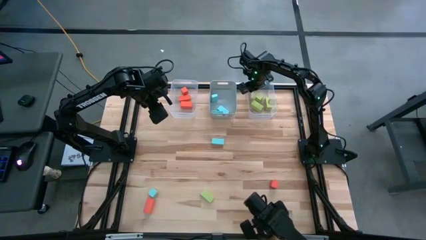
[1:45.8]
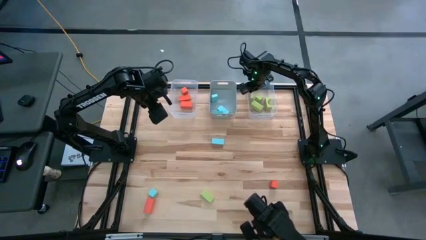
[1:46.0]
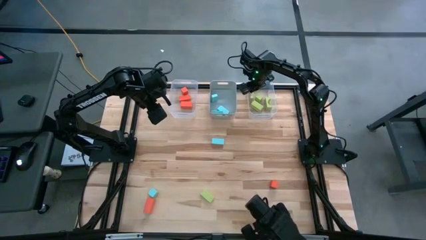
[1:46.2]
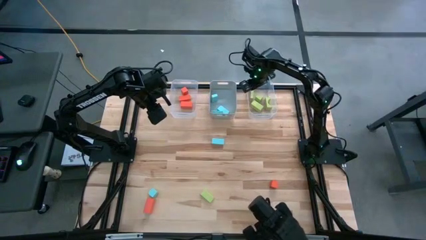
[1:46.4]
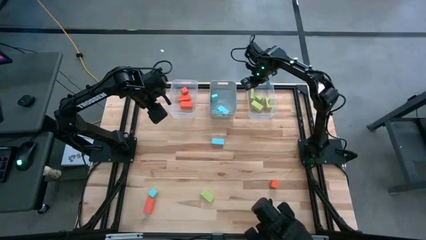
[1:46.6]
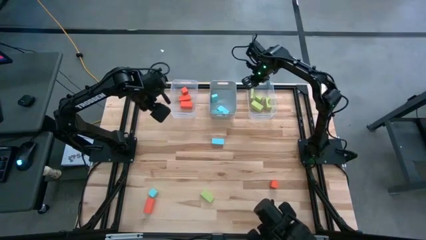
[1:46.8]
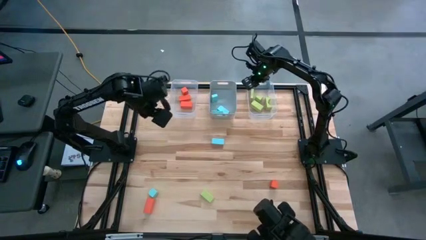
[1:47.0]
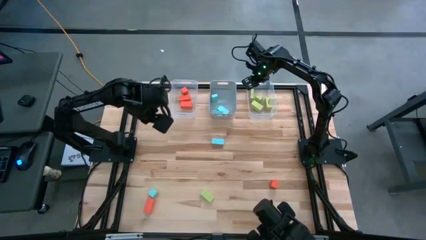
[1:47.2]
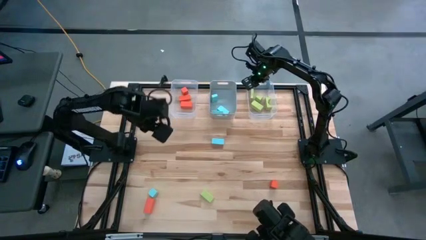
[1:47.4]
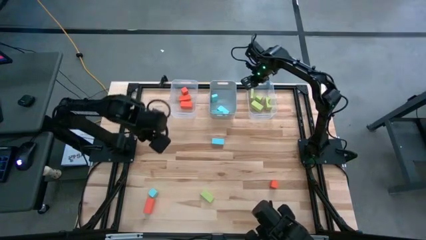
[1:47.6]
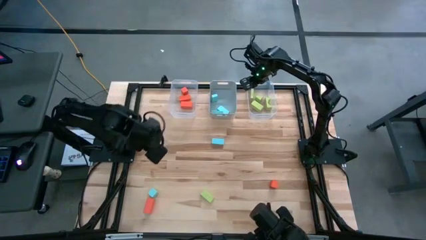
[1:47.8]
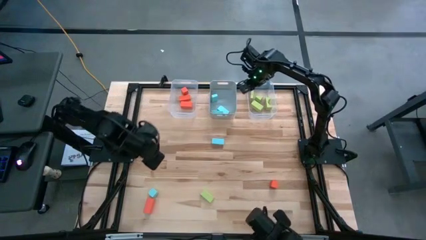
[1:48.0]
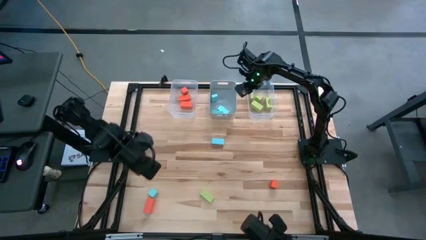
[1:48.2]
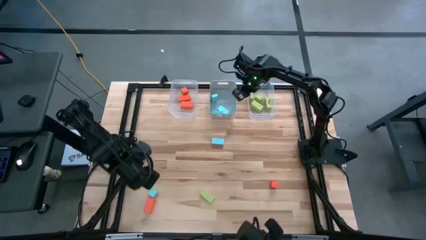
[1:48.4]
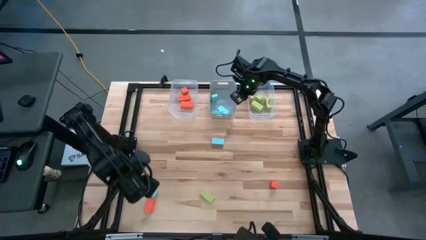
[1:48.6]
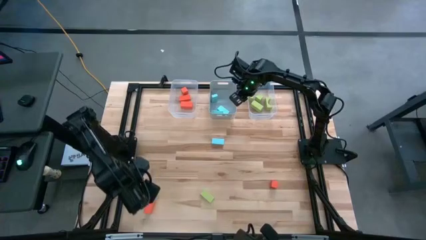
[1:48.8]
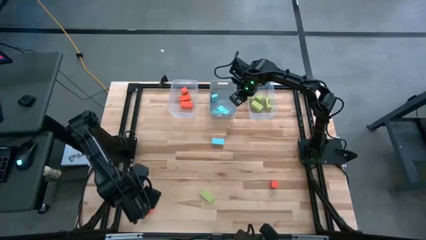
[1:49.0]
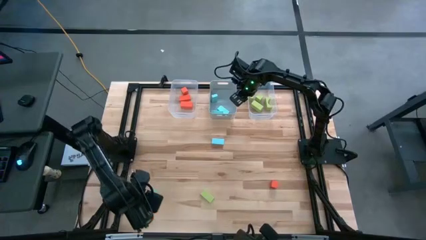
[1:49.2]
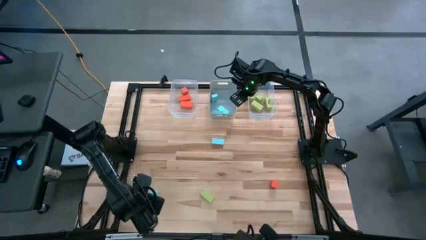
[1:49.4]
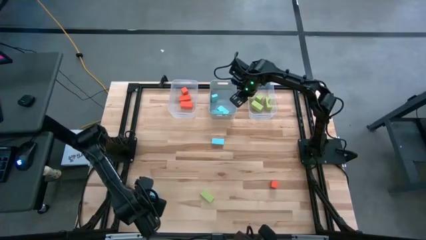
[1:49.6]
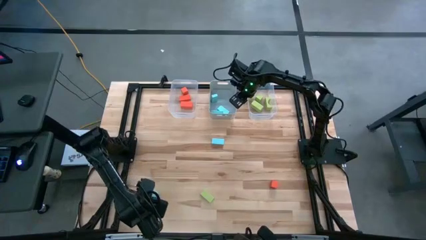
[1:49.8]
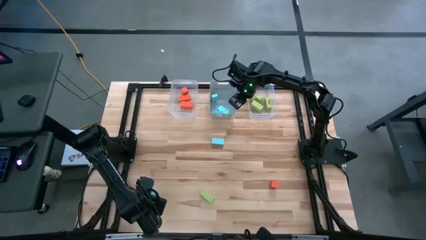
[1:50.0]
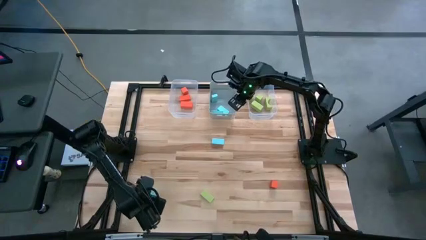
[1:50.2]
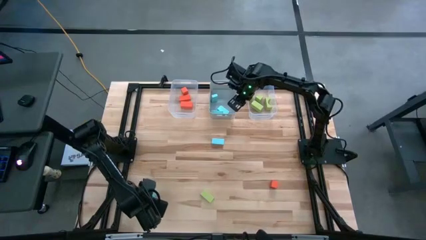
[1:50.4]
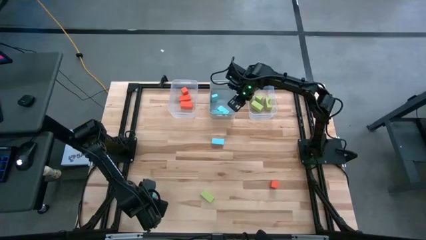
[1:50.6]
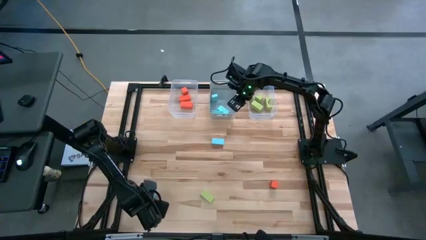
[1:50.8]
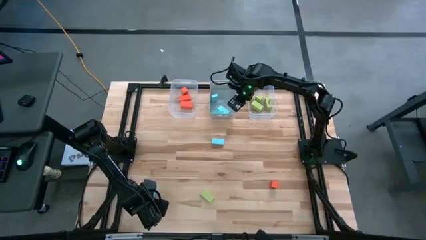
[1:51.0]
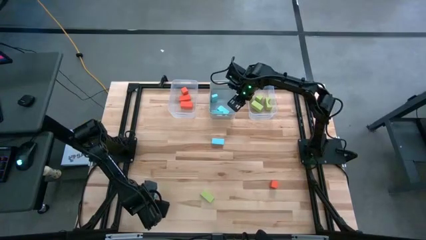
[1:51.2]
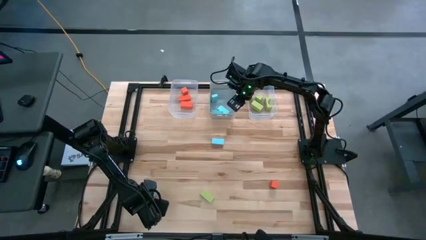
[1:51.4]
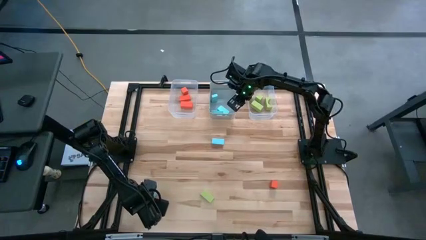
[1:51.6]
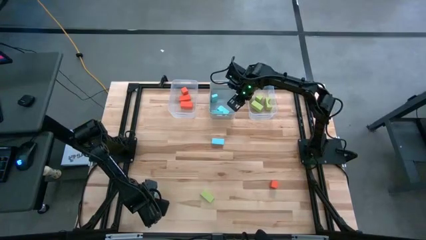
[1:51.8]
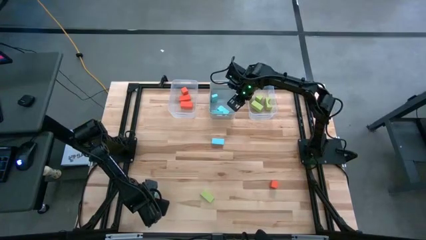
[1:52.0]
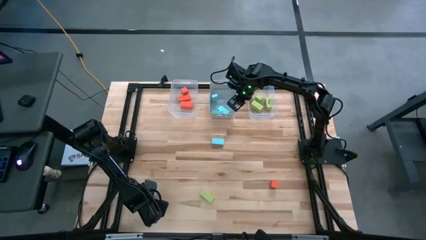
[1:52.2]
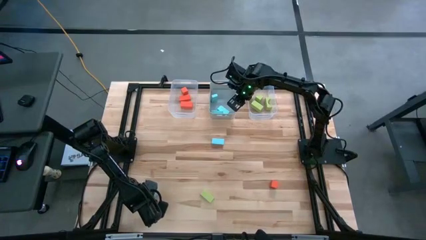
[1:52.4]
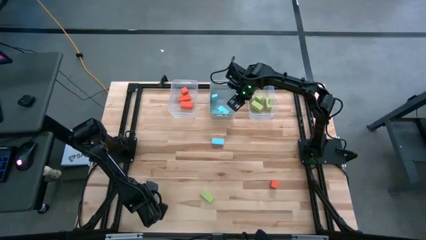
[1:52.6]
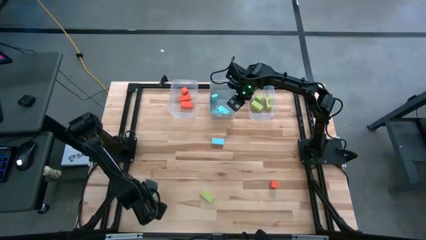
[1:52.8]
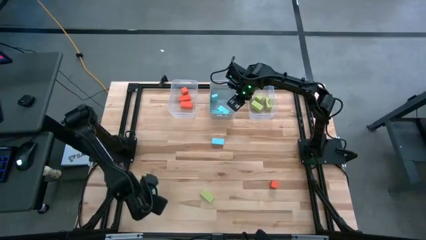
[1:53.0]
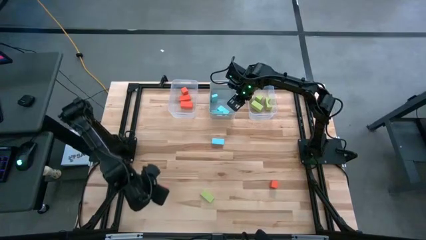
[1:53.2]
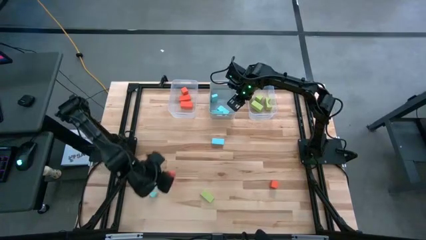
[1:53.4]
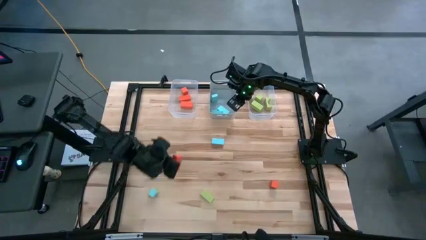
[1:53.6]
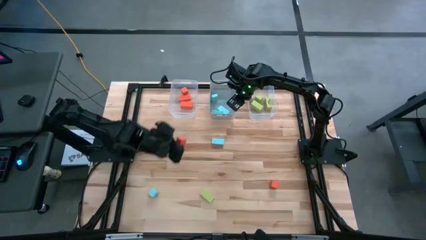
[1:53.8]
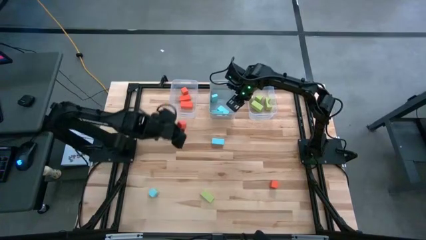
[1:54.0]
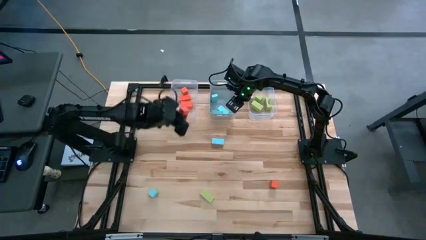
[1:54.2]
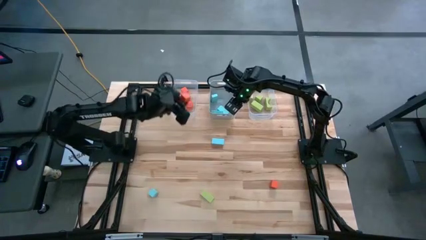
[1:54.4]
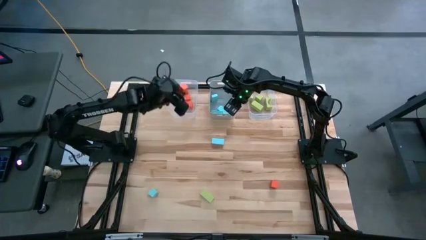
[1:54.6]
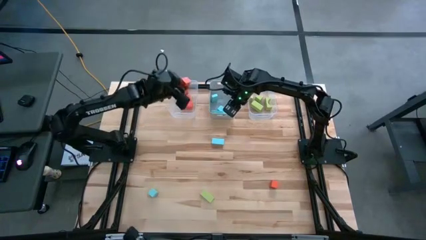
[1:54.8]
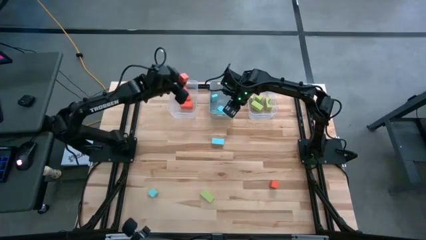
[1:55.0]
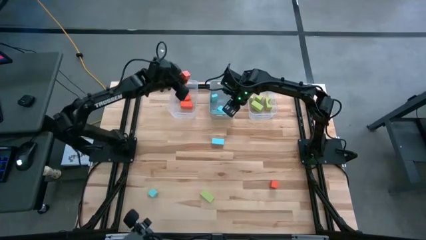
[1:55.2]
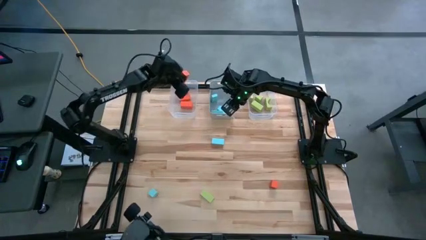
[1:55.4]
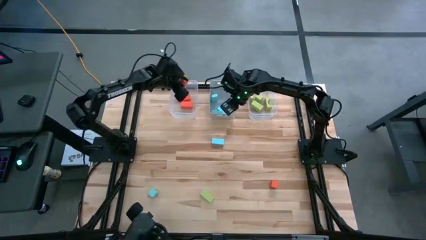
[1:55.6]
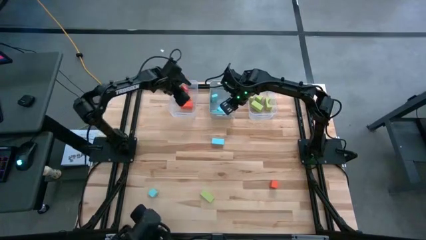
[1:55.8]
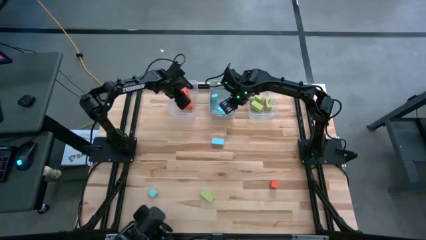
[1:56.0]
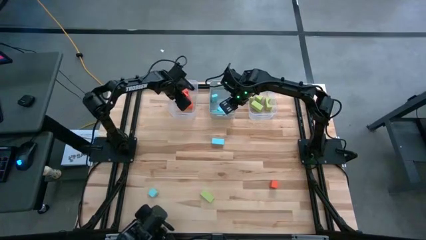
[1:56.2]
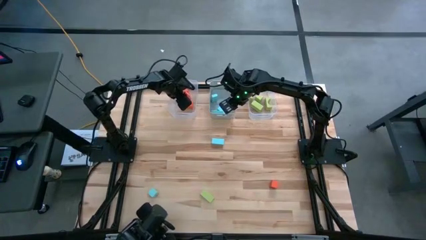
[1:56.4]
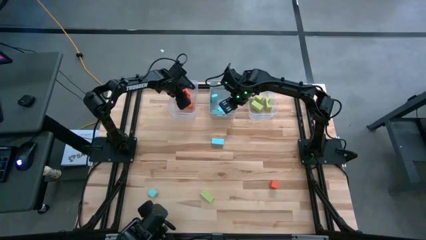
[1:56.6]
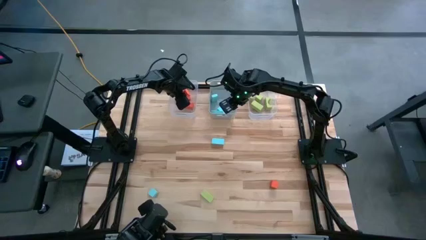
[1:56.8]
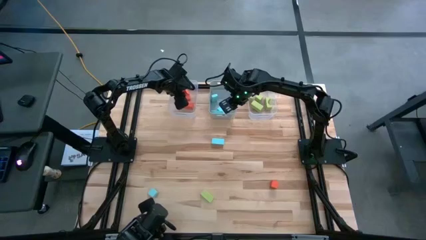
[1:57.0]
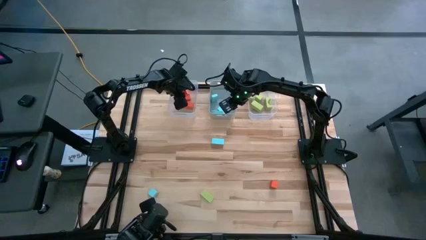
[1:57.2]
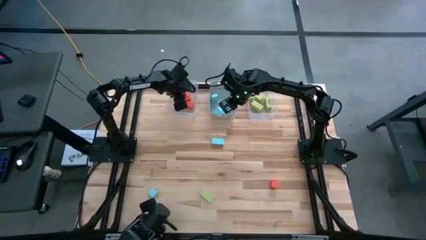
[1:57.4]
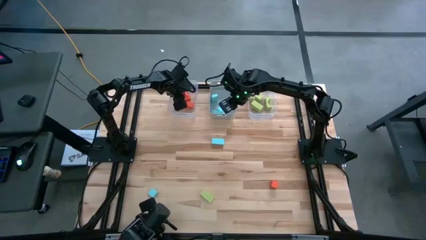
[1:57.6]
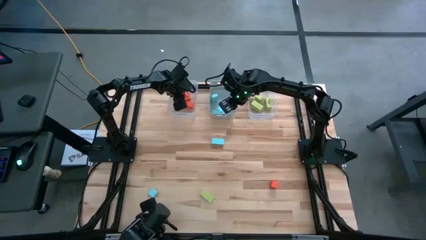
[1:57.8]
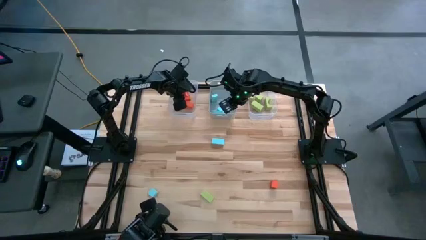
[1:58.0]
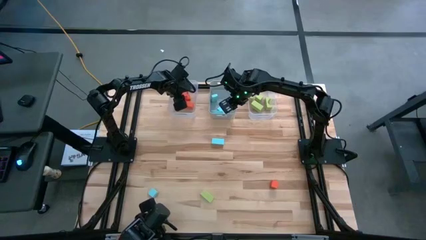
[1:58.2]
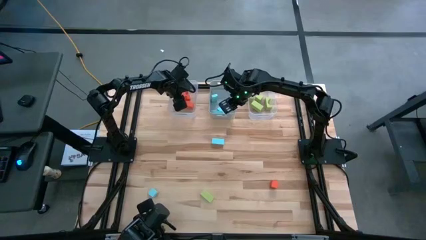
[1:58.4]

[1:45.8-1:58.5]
Task: Sort & place blocks by color
Put the orange block into the left transparent bin

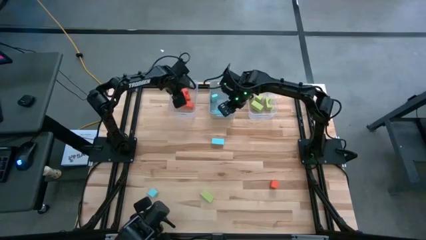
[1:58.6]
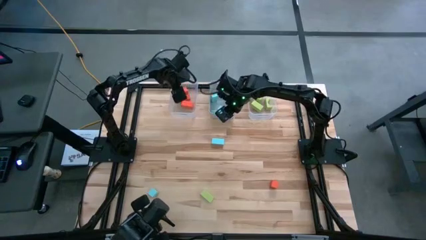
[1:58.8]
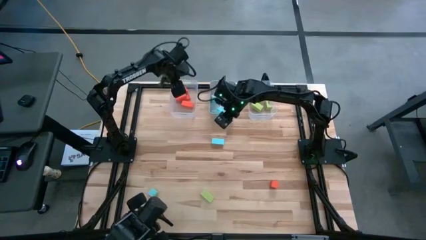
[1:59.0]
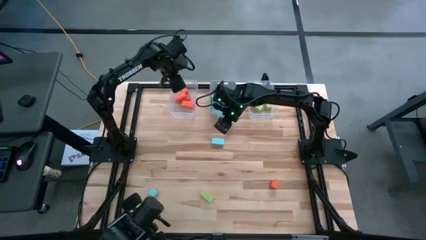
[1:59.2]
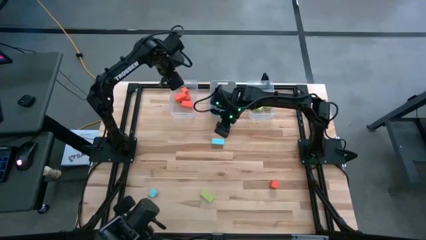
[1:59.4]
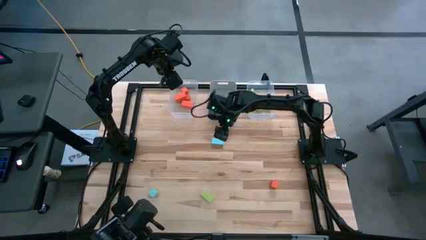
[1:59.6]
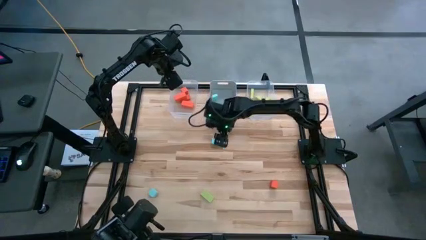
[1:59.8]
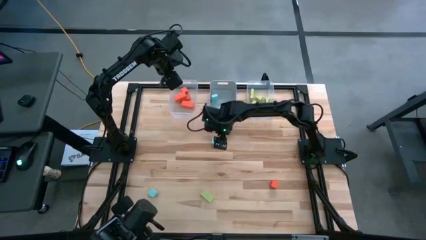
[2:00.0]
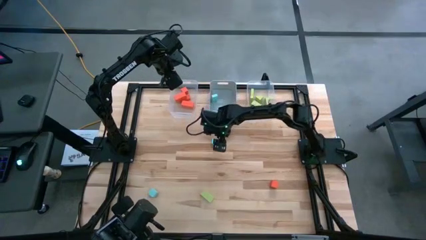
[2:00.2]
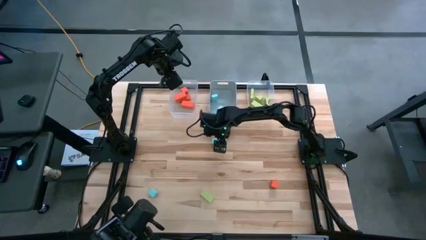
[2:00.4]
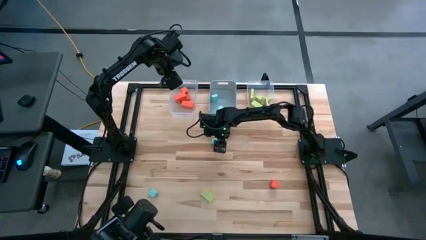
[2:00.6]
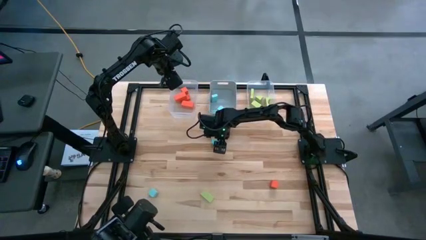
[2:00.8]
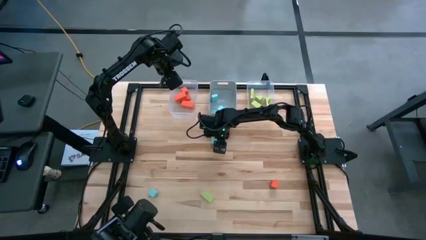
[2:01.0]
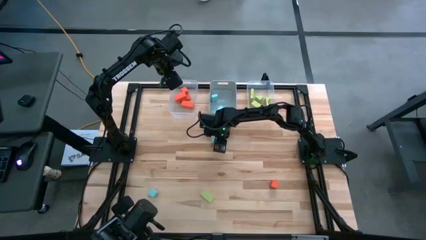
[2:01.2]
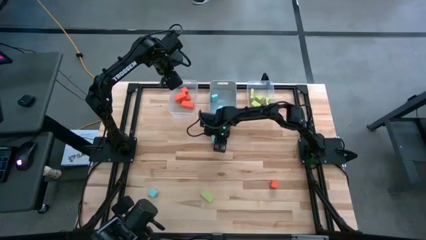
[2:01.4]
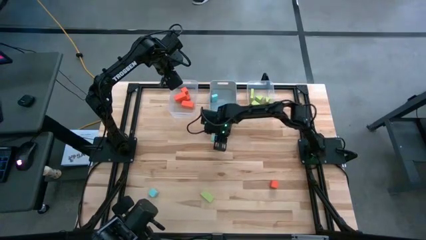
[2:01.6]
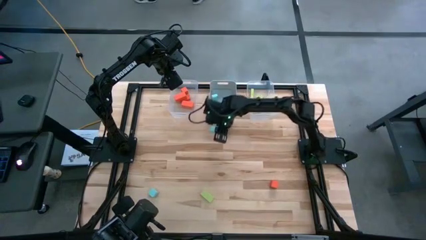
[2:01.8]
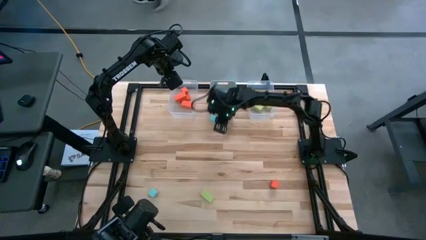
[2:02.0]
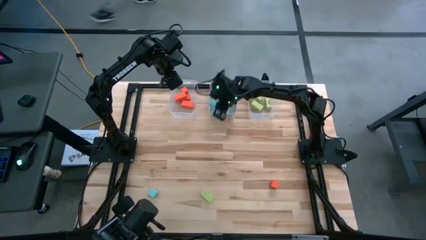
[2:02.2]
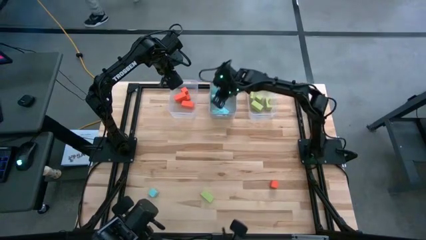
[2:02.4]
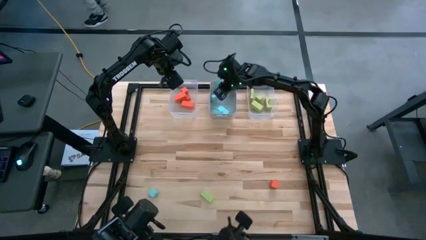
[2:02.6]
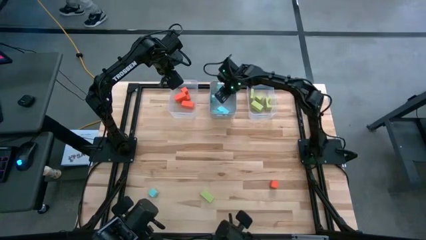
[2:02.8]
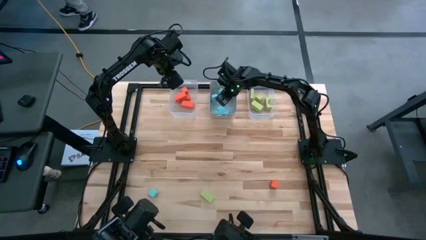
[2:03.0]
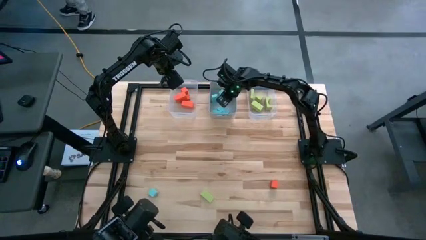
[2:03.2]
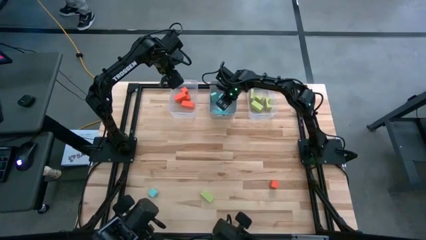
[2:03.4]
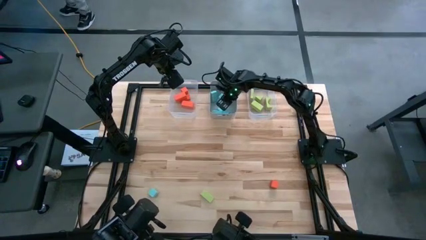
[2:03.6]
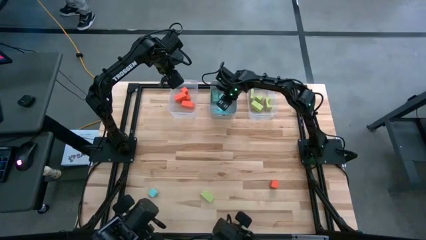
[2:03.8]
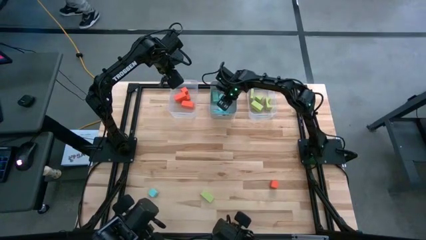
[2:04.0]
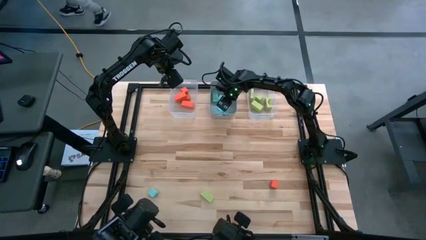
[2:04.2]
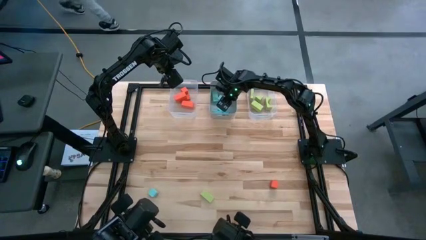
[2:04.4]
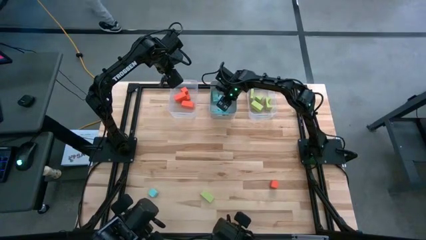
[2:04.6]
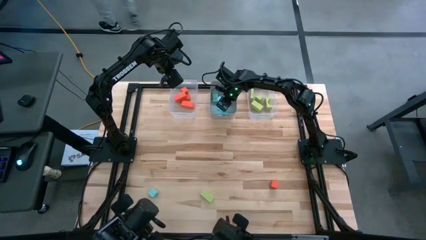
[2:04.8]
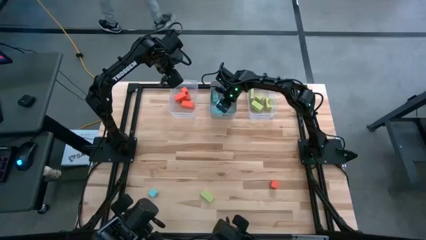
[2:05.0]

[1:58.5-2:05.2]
Put the blue block into the grey bin
